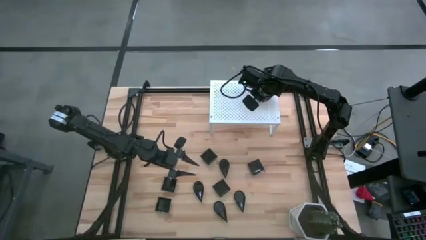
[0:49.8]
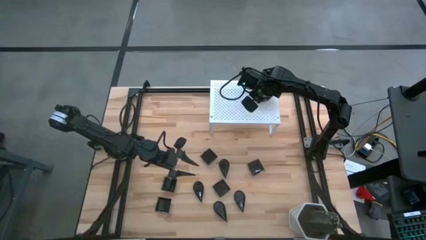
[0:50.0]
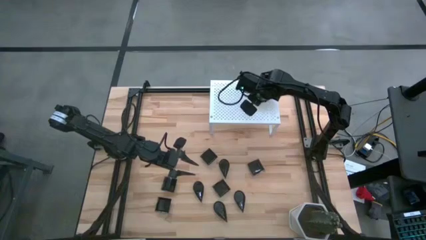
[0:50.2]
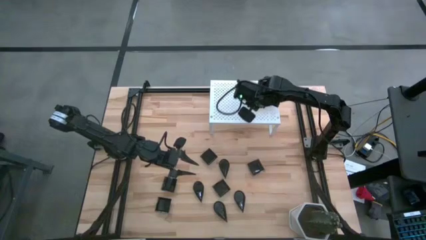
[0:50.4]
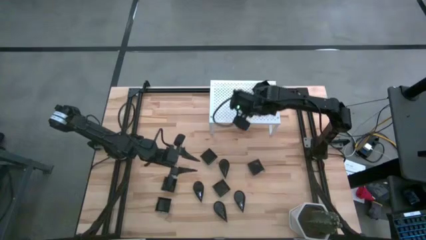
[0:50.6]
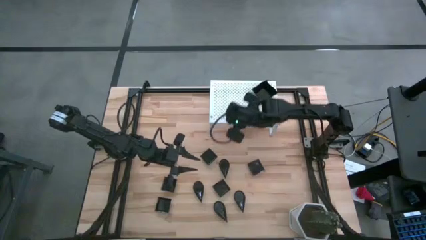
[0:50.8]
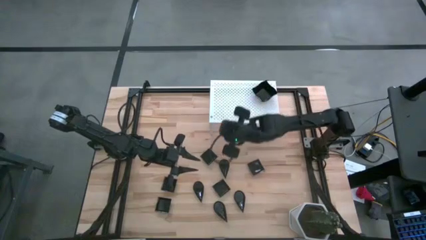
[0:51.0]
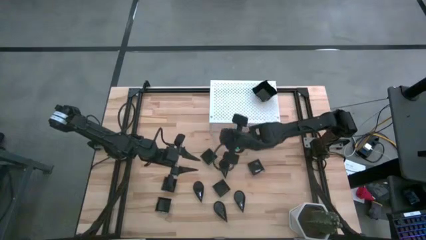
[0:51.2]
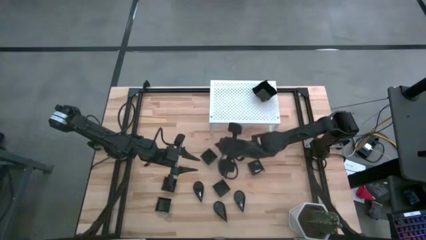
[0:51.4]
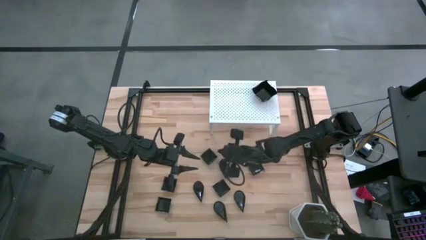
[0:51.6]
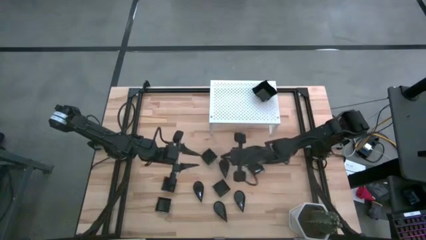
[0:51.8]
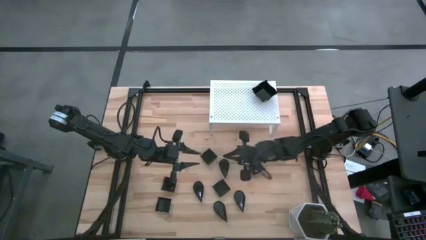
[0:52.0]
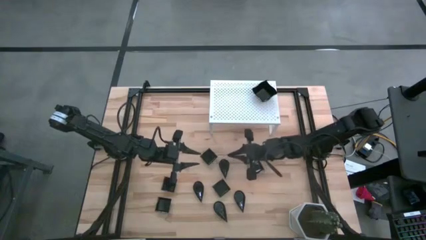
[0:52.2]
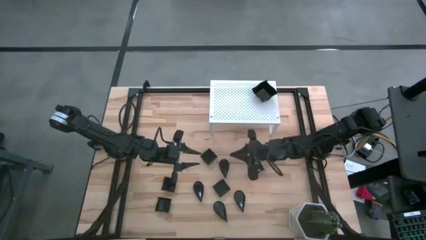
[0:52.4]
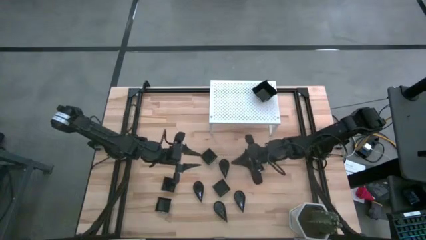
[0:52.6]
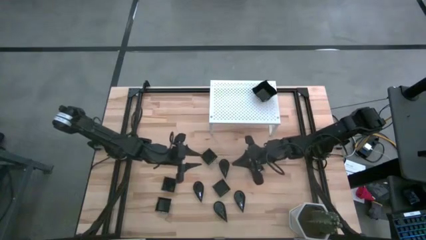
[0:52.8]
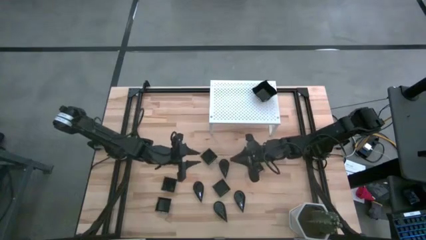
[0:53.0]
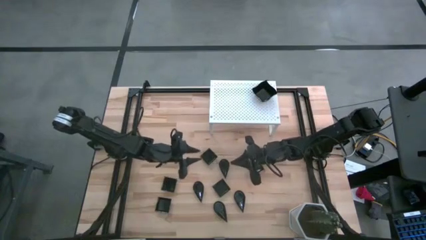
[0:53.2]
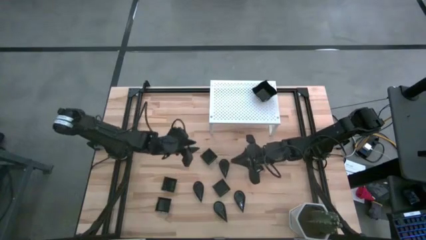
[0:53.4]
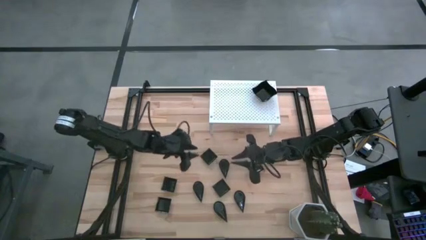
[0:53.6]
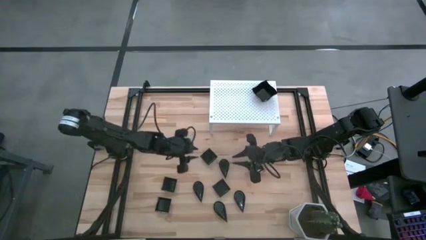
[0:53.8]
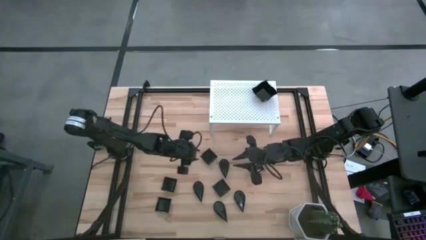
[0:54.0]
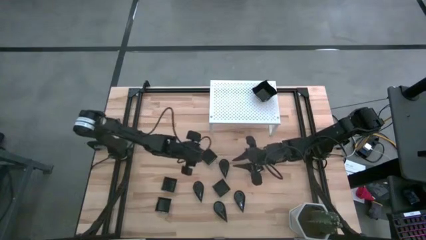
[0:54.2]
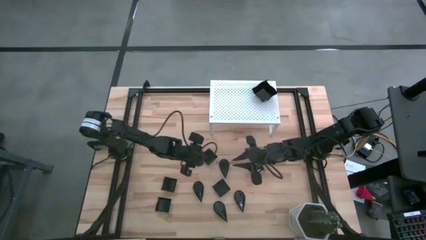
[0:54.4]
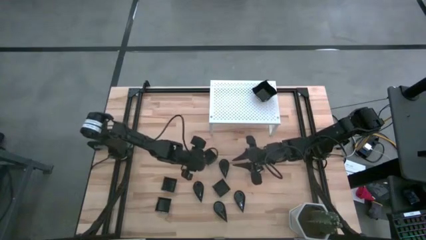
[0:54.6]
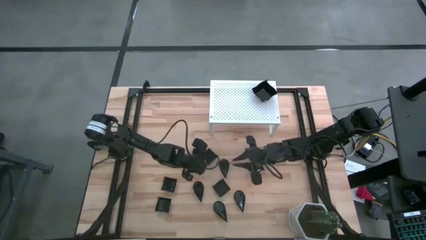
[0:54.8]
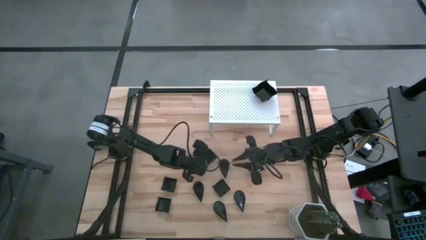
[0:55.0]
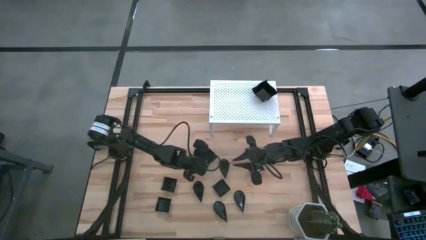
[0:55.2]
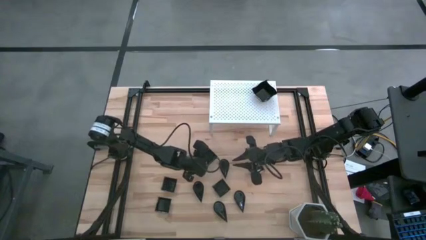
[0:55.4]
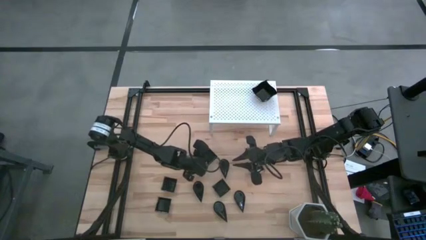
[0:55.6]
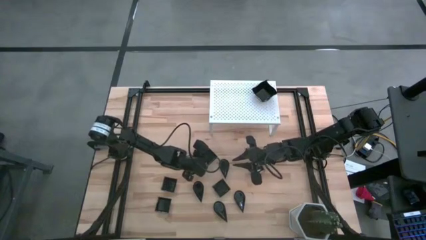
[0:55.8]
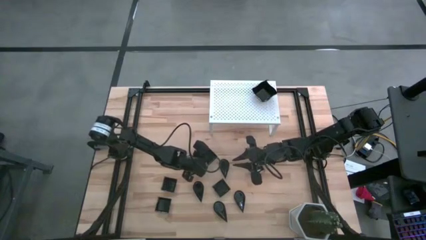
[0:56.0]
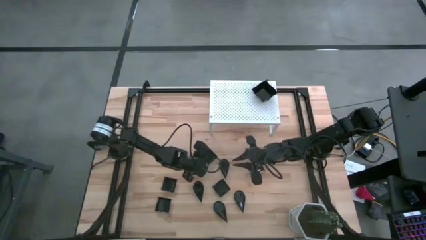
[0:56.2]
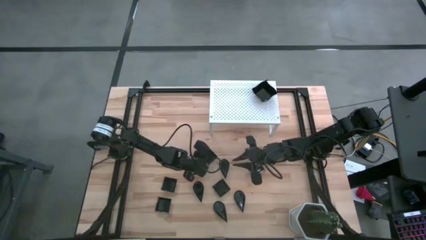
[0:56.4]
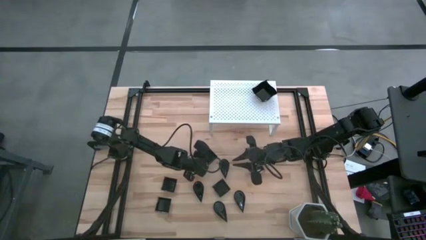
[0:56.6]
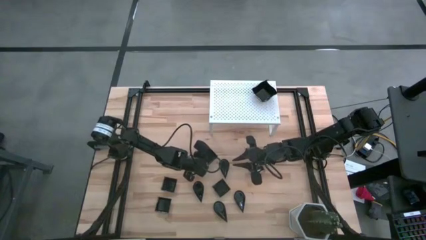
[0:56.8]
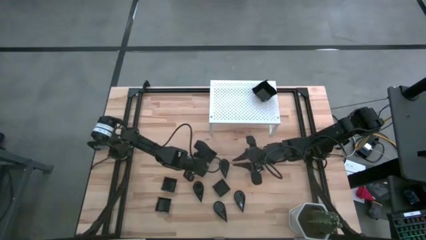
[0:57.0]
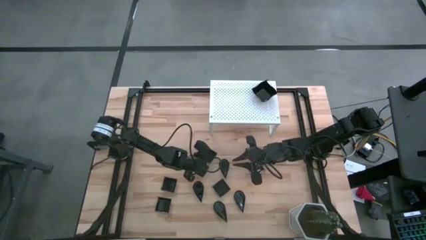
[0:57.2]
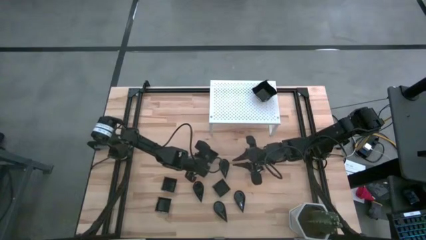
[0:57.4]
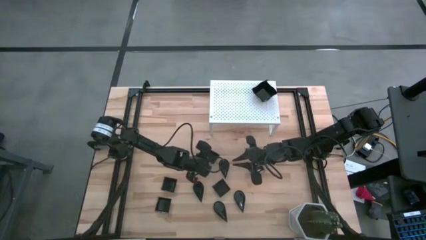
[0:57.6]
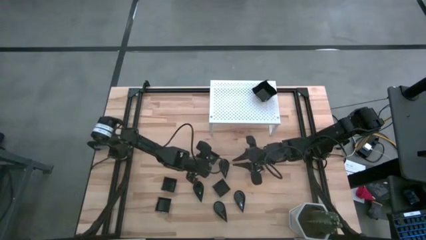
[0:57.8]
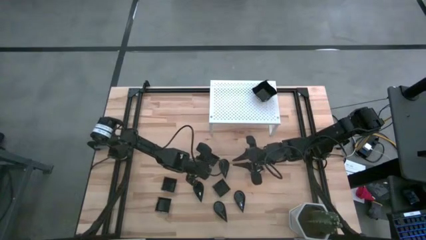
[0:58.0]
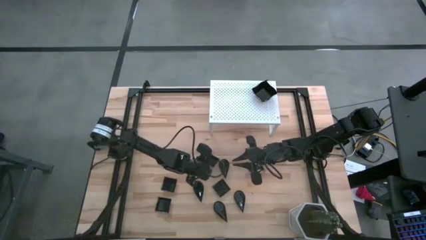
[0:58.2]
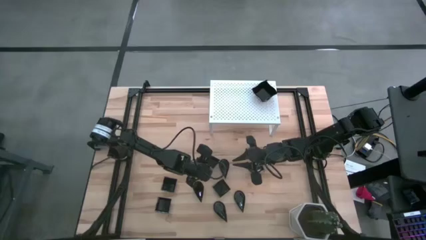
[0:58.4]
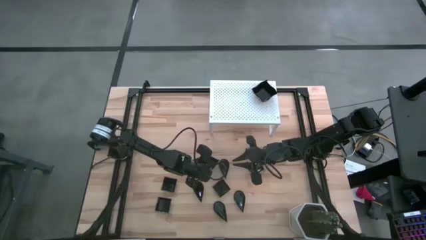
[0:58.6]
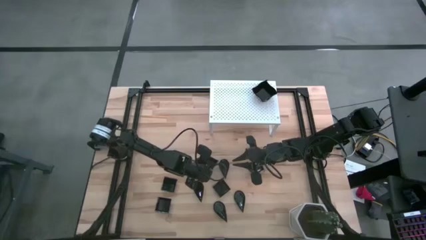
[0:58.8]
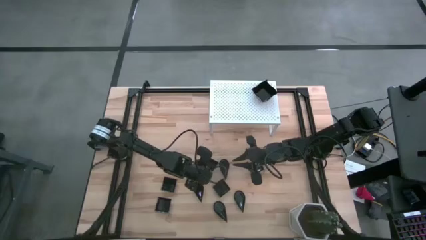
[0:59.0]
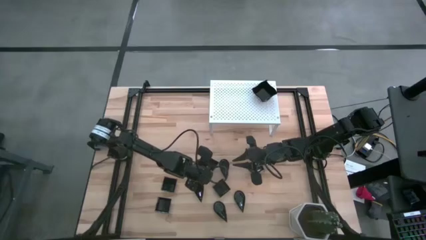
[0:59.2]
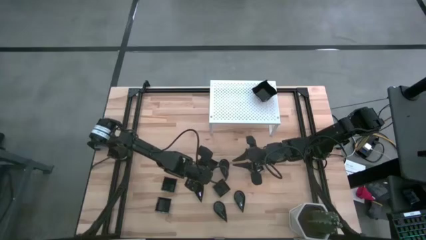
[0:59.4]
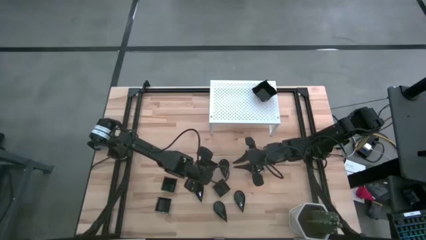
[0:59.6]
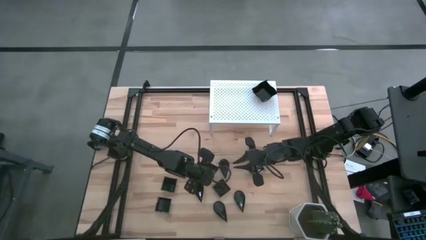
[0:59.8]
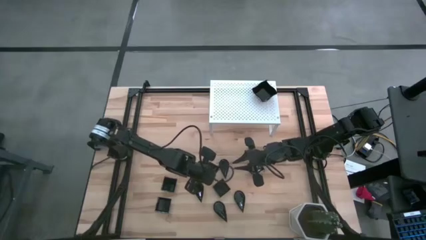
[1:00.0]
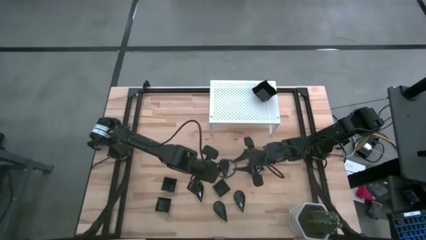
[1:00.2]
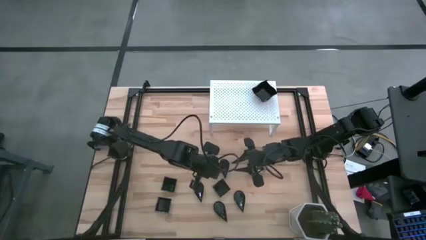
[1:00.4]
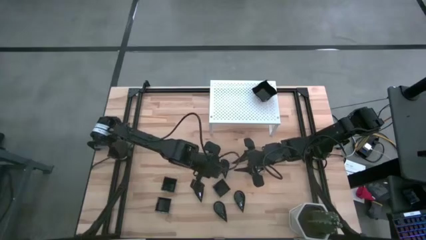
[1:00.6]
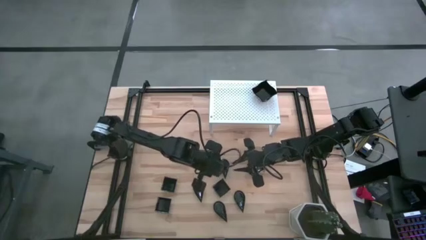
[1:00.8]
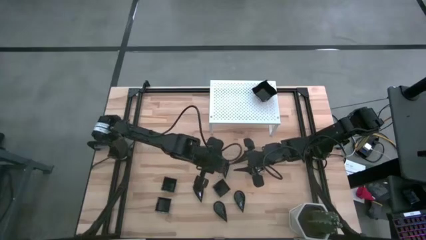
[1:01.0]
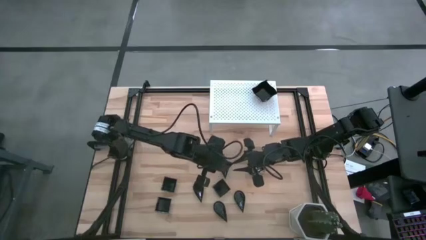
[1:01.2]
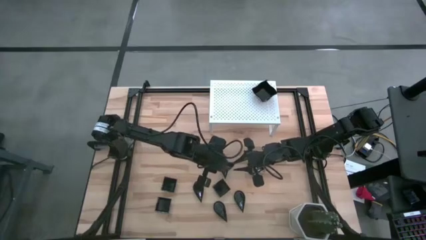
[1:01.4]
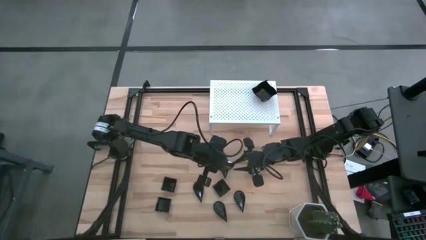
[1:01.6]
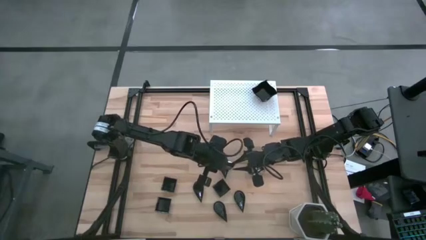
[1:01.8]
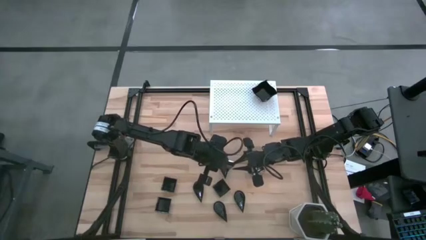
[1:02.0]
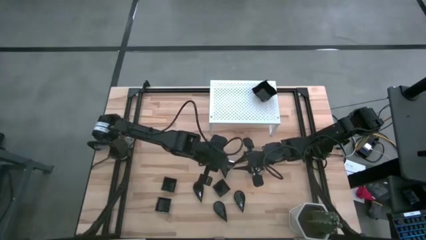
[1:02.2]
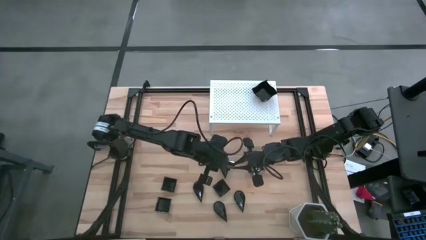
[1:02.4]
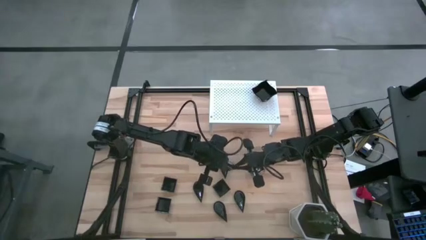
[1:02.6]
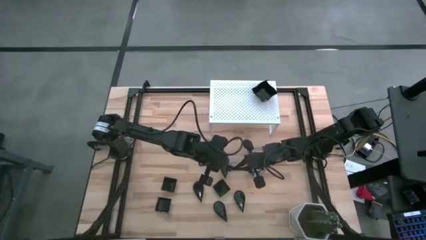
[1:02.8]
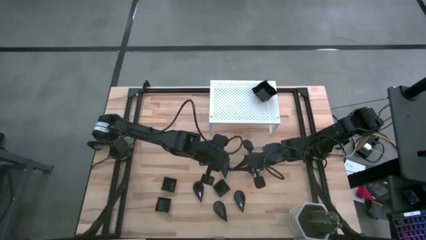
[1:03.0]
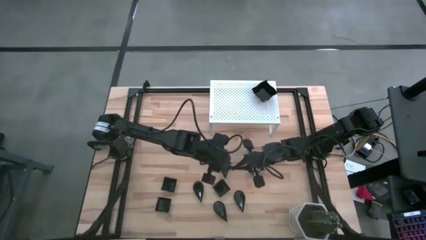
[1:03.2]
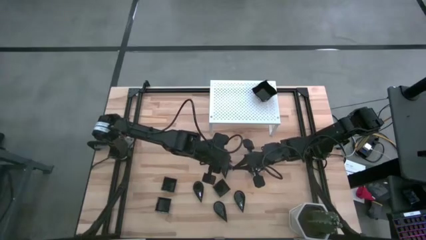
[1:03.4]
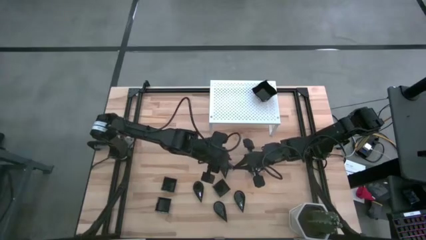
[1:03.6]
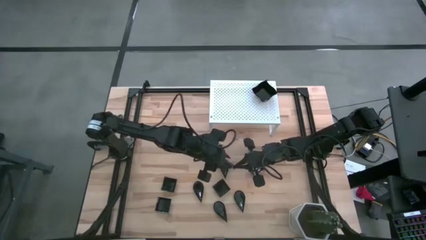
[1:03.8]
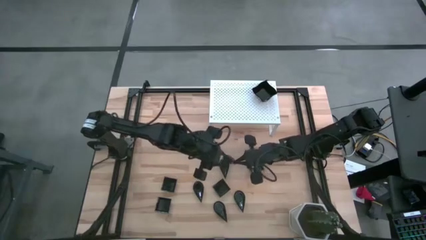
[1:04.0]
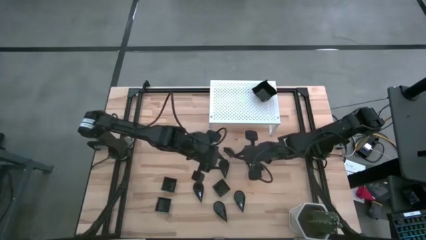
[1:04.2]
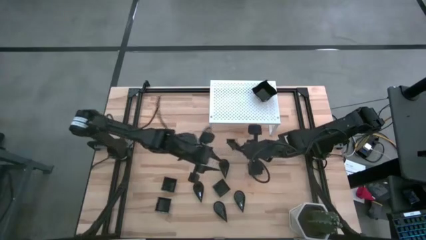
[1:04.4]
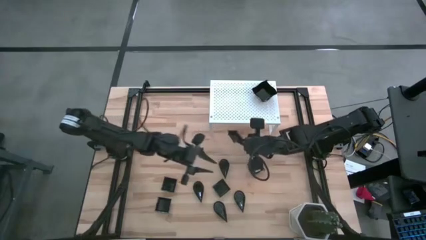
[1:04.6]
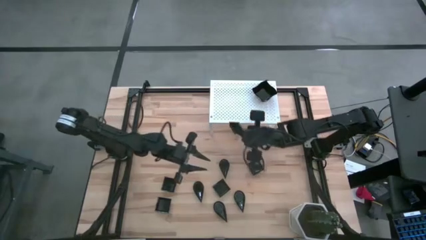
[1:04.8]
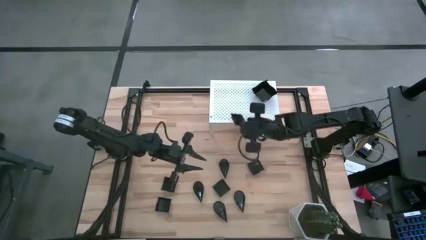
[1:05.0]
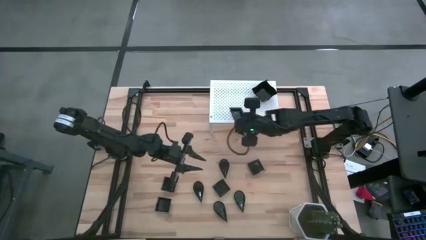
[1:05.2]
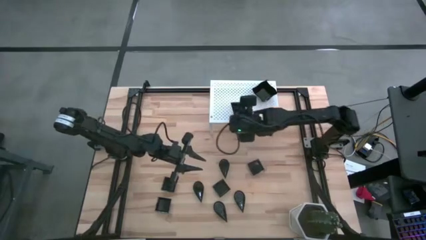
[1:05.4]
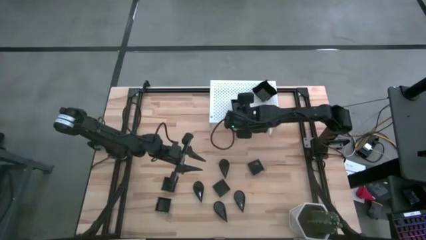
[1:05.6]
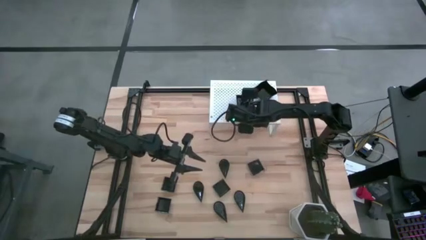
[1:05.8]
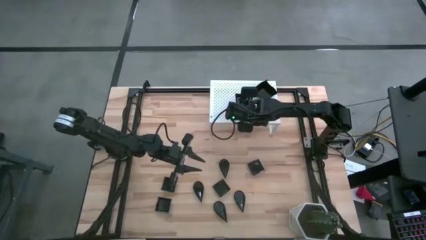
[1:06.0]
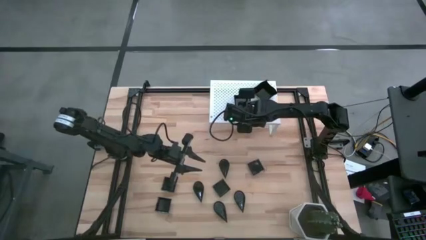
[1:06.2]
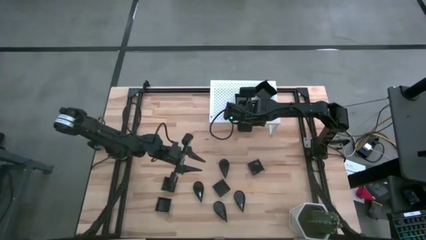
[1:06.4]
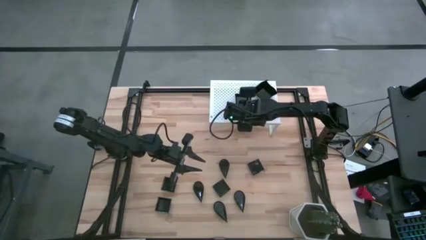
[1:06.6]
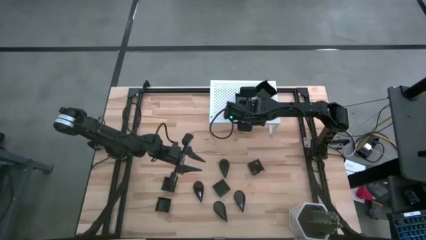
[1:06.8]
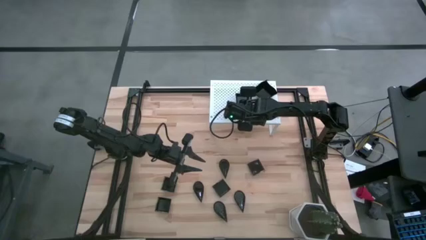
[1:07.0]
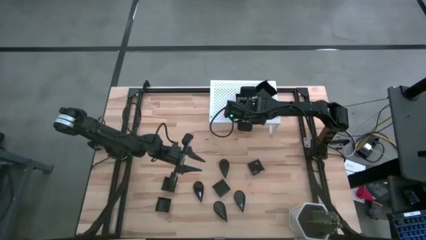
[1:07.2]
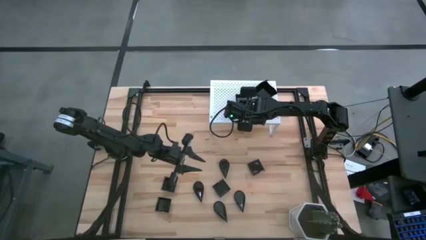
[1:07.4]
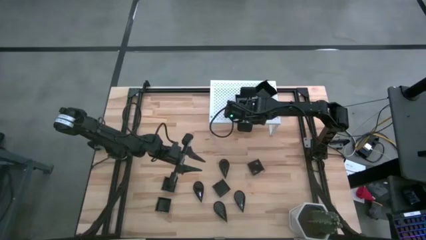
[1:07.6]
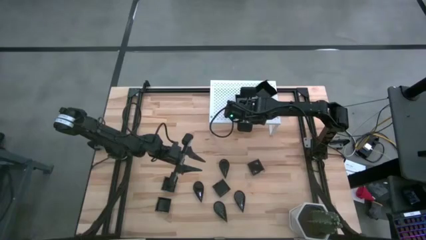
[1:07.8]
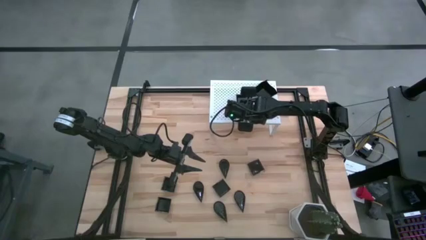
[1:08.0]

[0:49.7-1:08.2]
Task: Pick & Place Mini shaped plates
Put the square plate on the shelf
